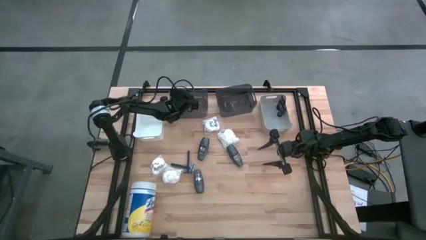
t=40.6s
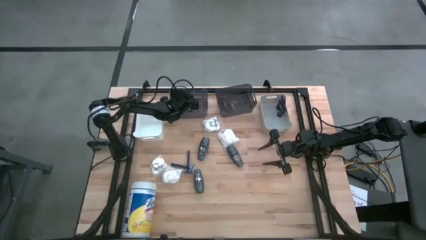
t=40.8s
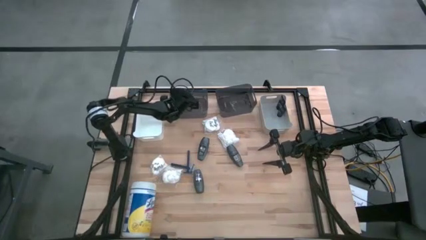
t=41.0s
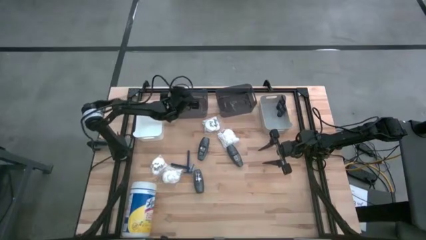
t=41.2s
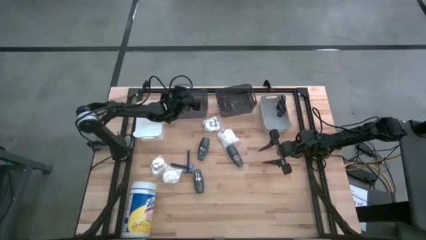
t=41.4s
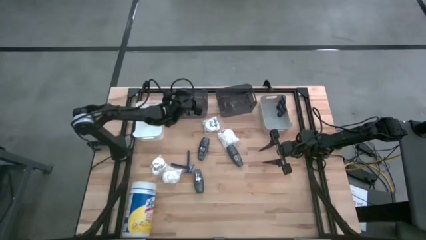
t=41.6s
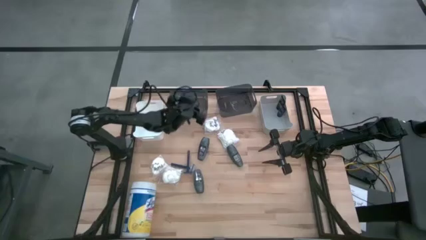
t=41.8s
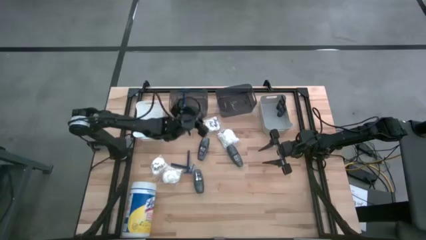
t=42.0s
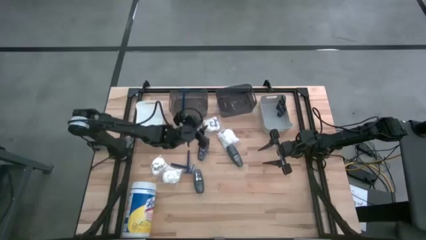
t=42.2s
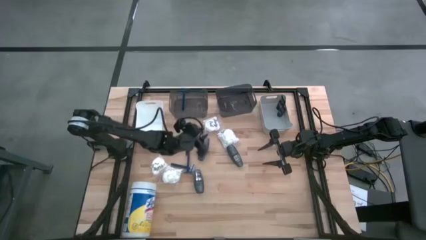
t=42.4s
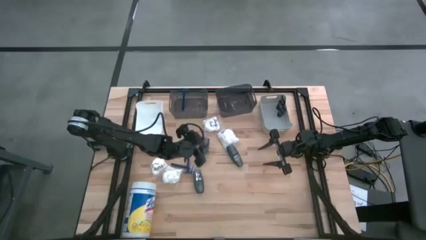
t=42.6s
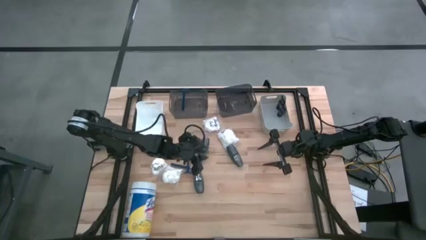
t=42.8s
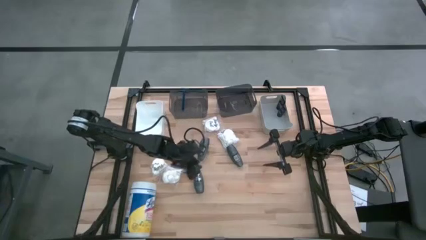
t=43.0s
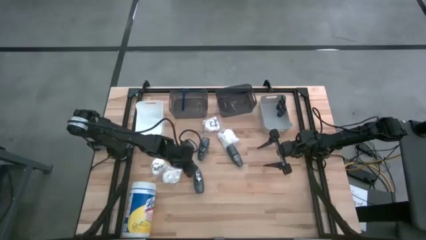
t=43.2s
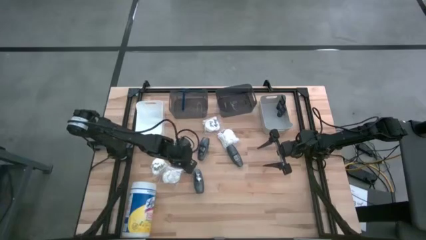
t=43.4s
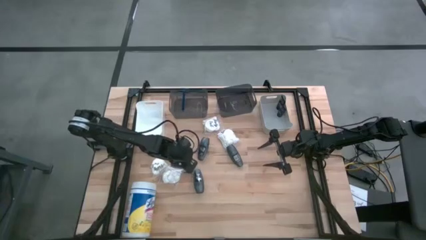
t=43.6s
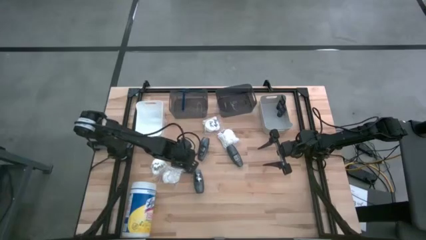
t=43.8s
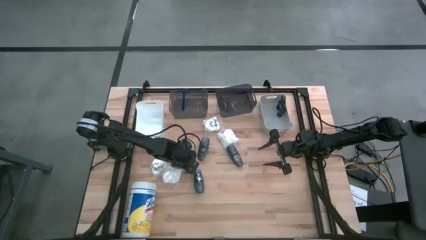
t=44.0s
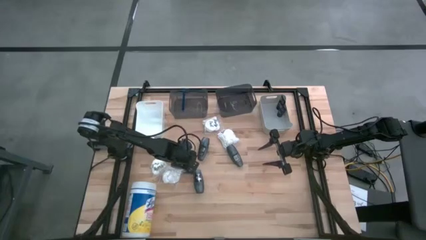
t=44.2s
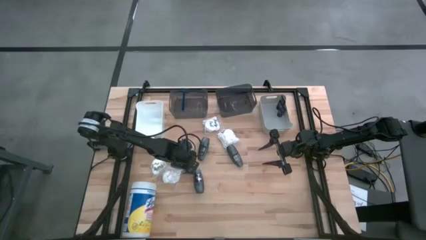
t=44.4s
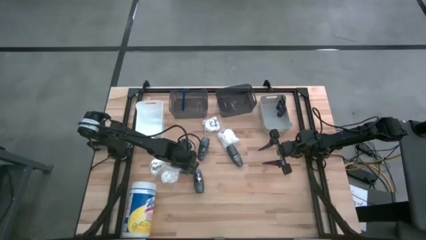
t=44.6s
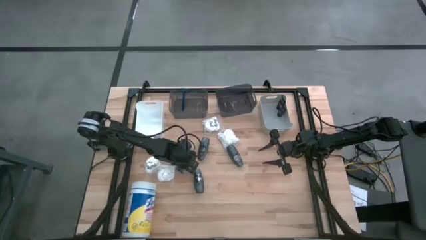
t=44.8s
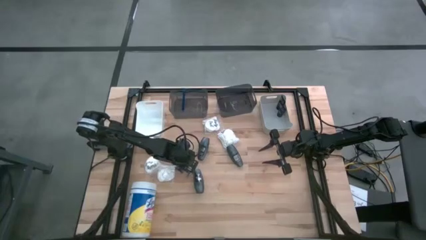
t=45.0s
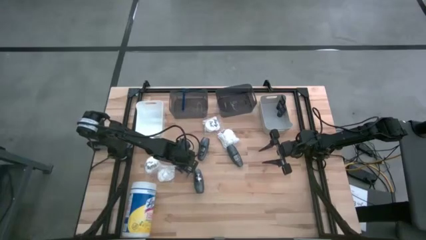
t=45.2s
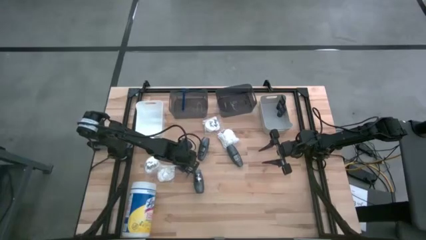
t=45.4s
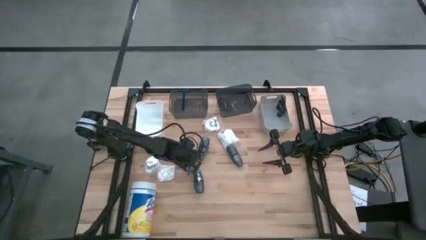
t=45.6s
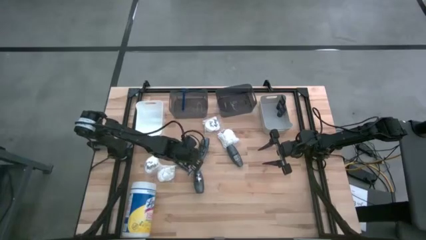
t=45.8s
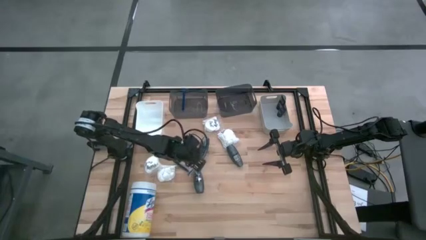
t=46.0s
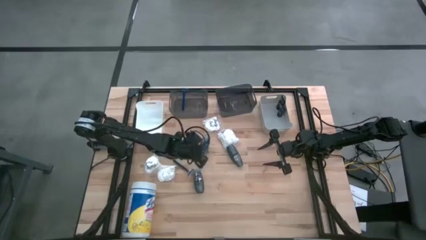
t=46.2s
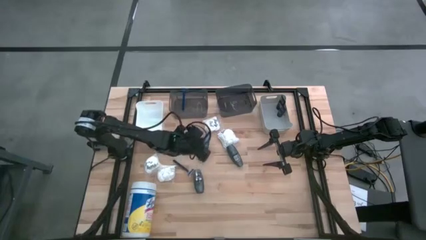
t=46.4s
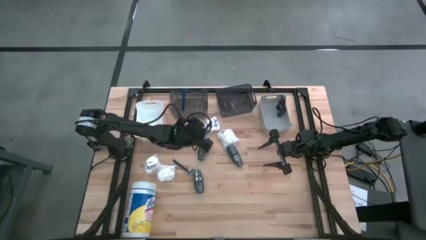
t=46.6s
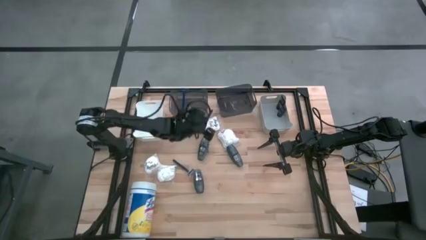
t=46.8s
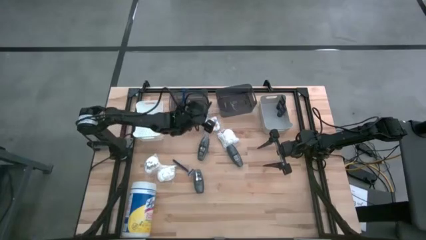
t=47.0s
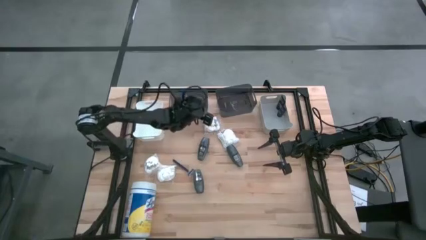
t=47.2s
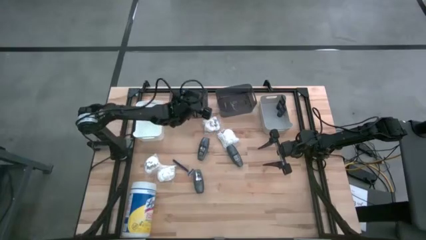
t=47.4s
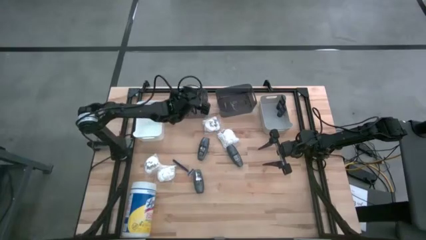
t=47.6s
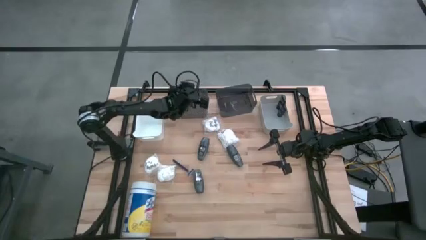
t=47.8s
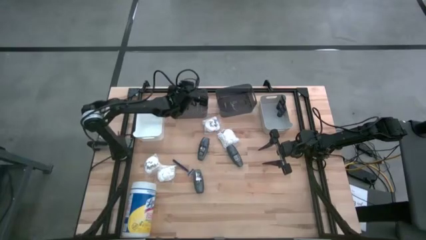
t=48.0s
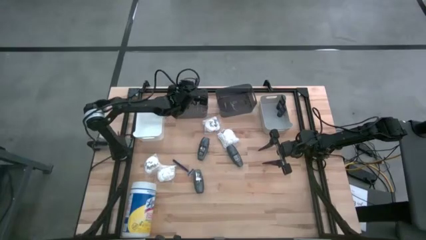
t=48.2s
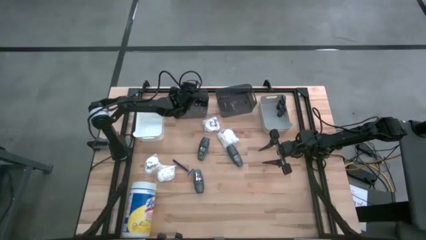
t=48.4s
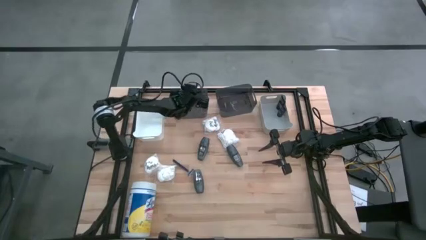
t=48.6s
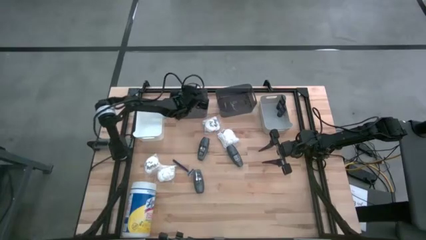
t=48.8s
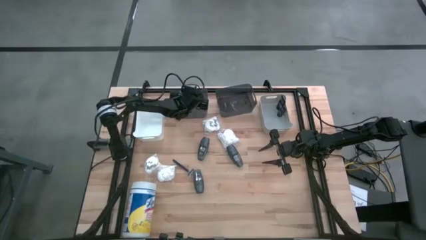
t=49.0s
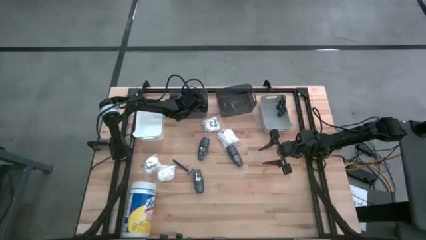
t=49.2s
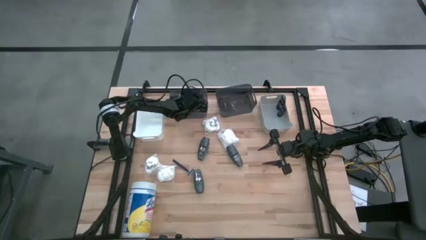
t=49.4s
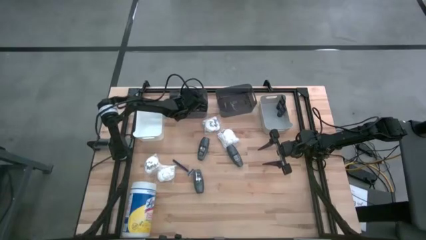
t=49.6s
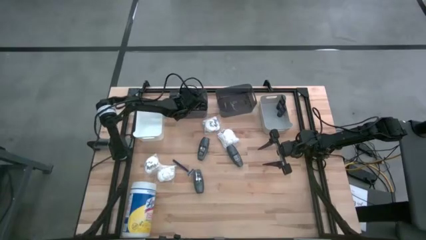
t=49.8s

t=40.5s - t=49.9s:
Task: Pick & Place Travel size toiletries
Put the blue razor into the left black bin
